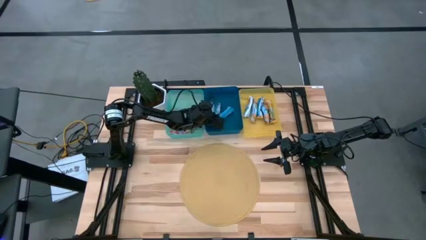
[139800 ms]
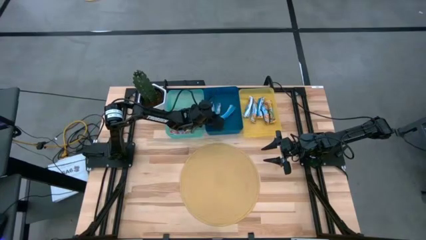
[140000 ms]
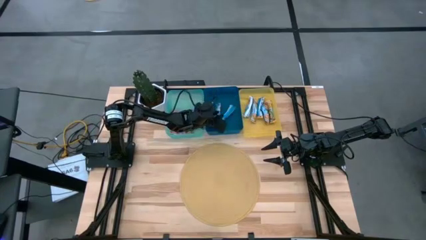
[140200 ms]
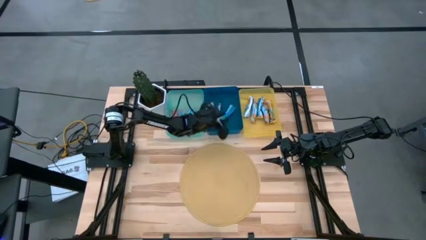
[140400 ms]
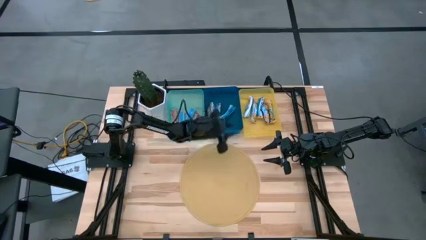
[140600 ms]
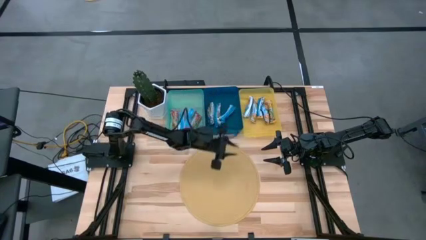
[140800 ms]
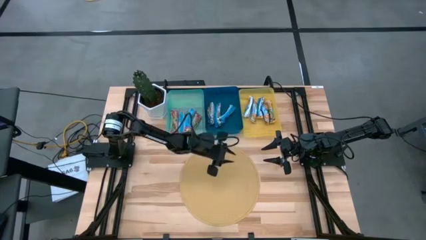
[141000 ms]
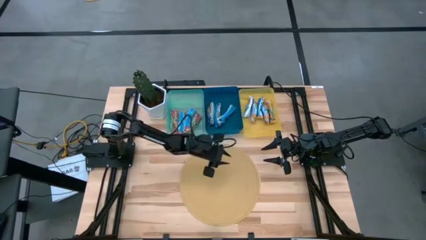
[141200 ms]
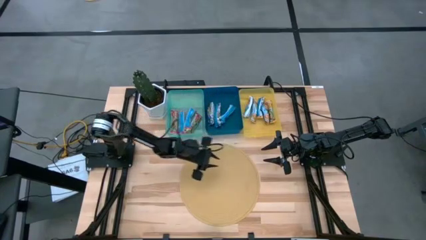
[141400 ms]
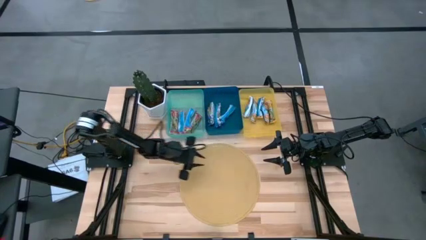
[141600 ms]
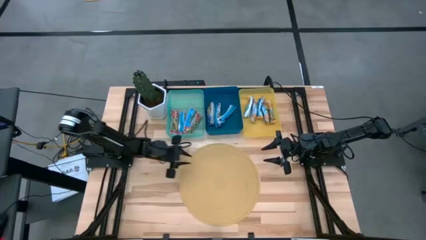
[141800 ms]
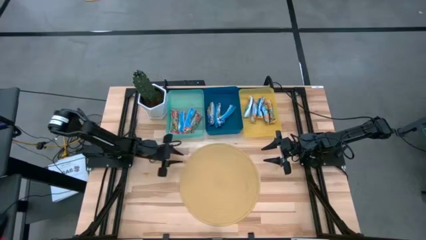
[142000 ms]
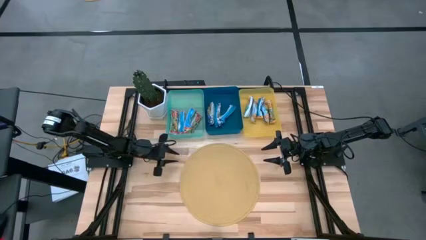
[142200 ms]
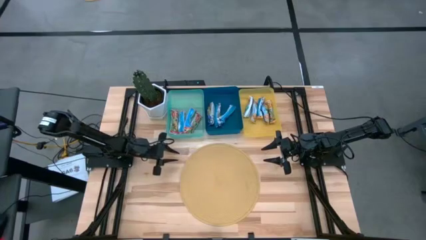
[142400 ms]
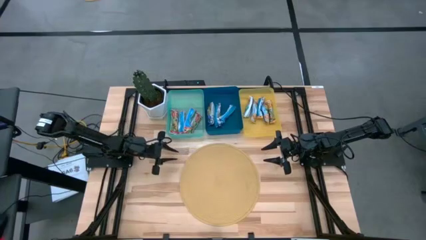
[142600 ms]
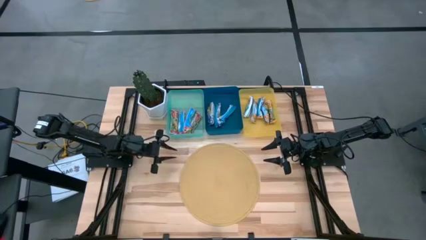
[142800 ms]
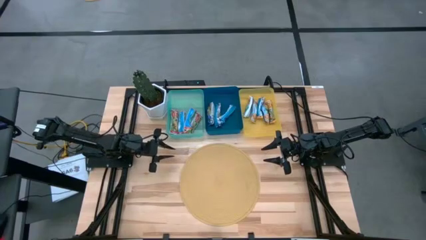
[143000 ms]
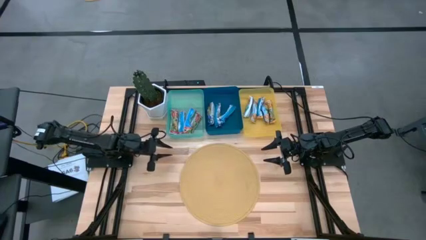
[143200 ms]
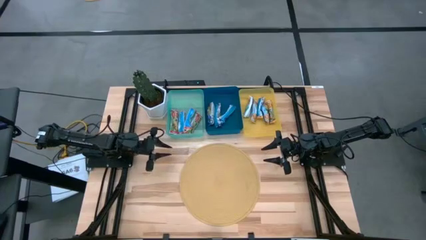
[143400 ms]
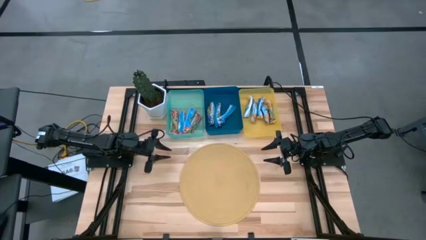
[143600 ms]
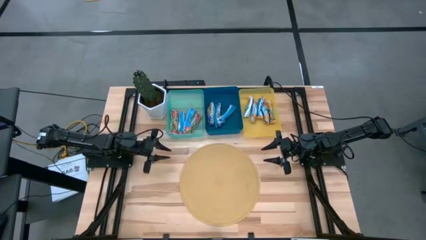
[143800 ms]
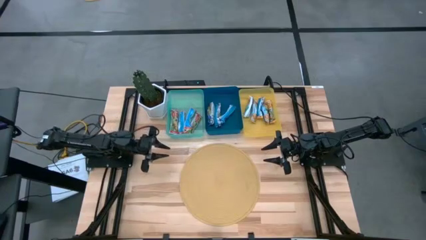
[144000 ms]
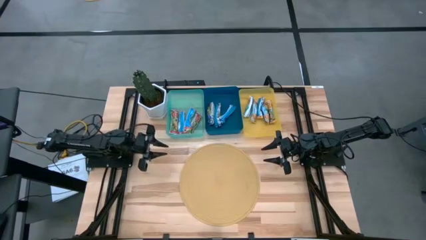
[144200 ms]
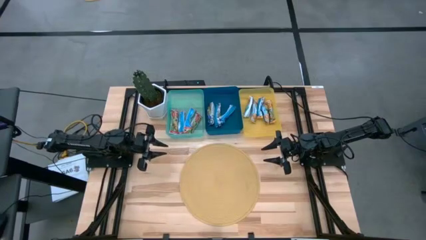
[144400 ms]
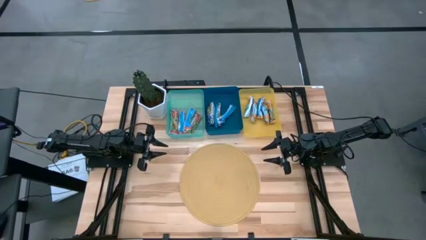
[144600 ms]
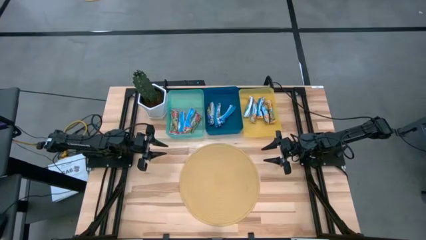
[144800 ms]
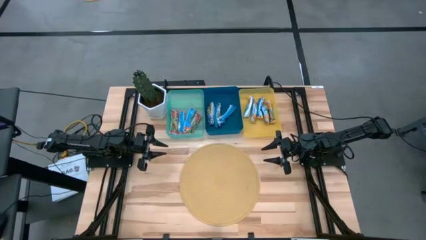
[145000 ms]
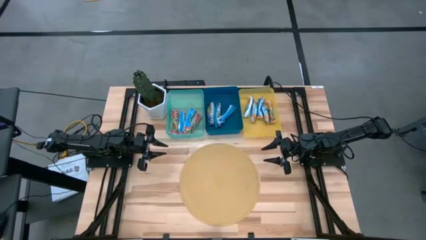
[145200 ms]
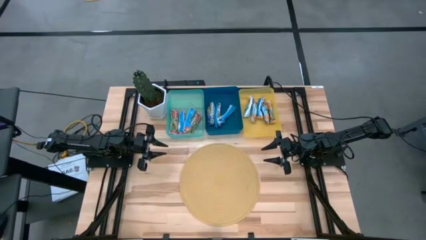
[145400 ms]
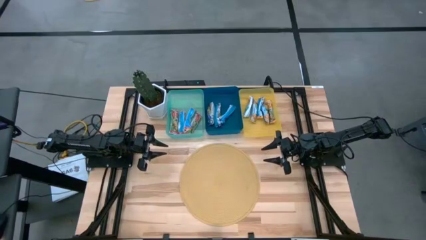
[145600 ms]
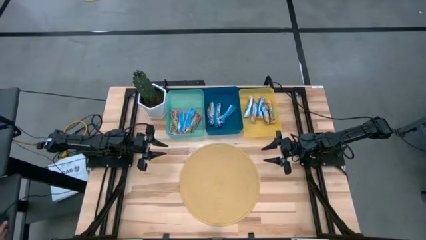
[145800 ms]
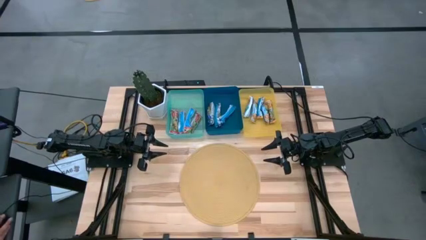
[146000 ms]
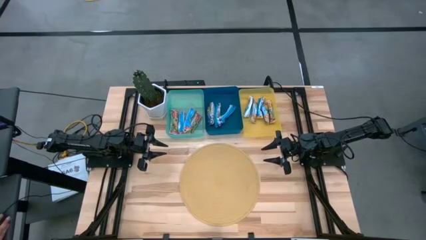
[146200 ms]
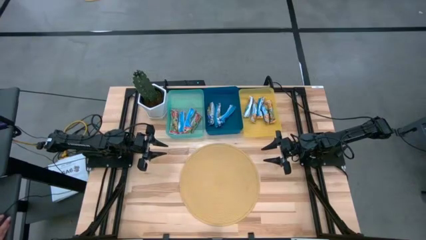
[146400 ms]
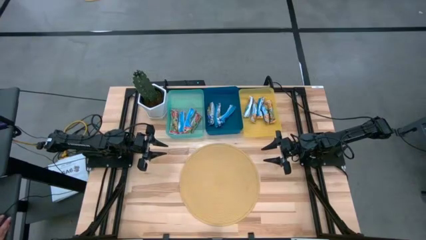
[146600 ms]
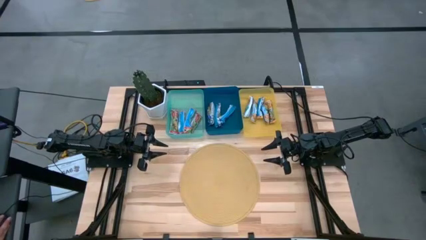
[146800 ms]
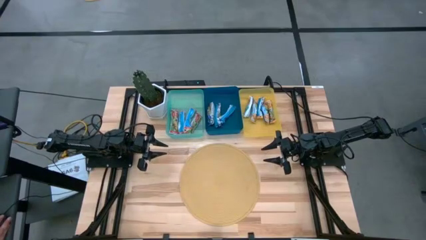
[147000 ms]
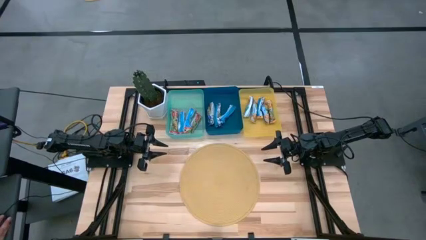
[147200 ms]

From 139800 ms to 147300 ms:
Task: Pick and place Granola Bars by type
Return to Home Position

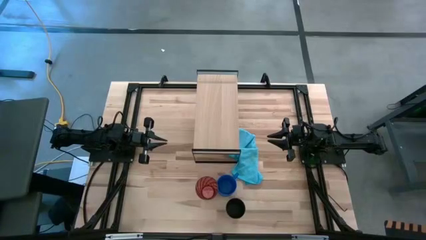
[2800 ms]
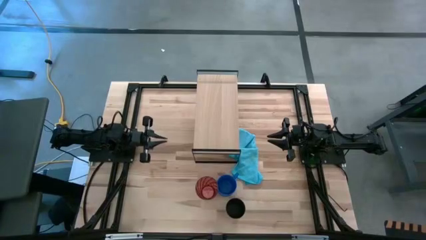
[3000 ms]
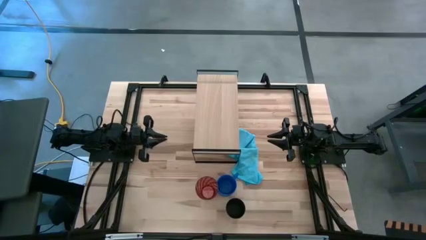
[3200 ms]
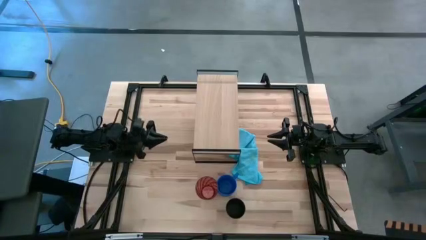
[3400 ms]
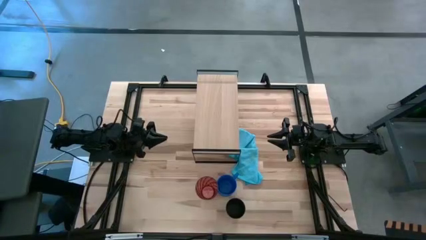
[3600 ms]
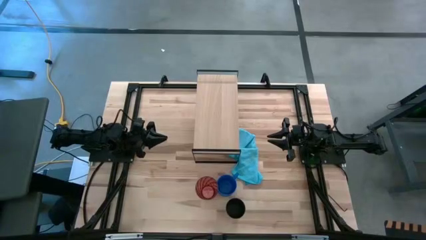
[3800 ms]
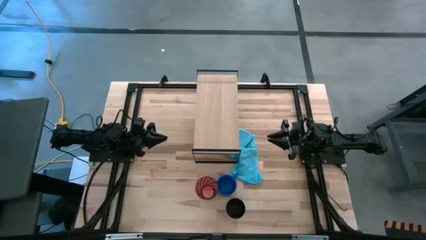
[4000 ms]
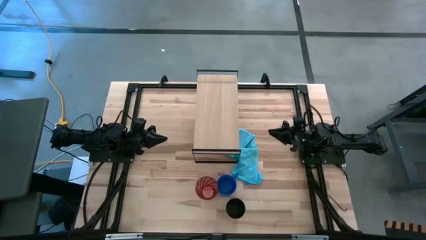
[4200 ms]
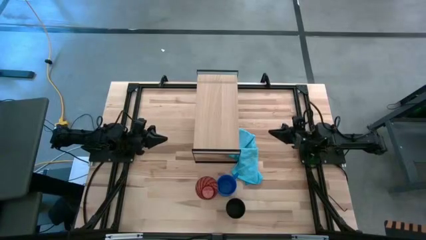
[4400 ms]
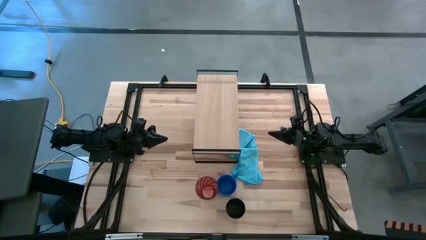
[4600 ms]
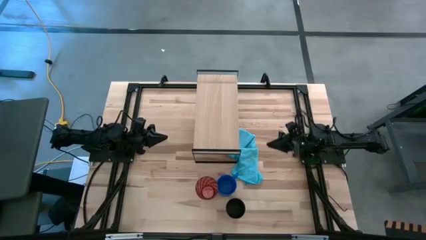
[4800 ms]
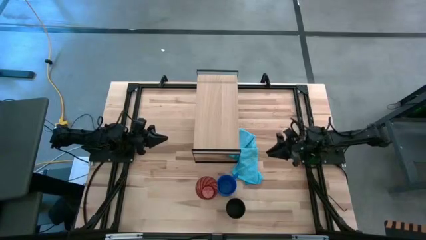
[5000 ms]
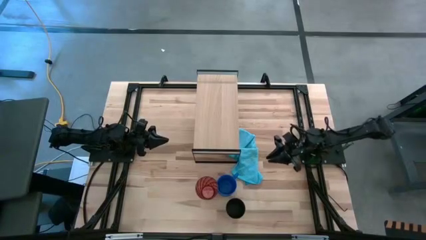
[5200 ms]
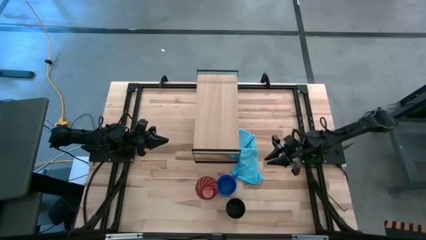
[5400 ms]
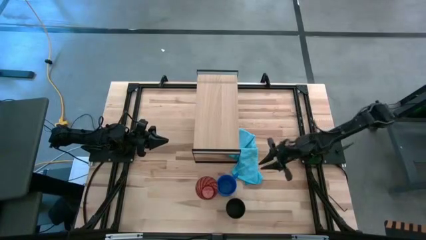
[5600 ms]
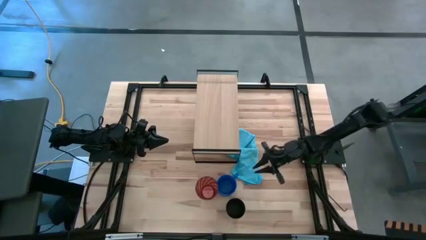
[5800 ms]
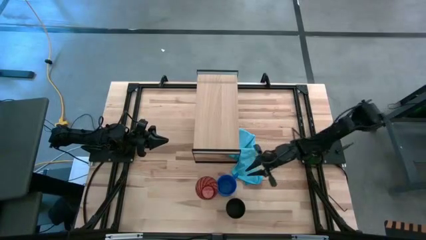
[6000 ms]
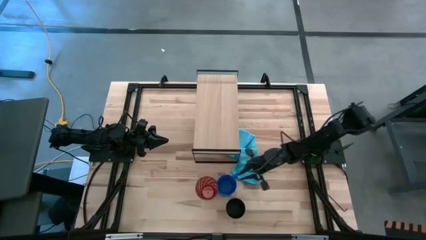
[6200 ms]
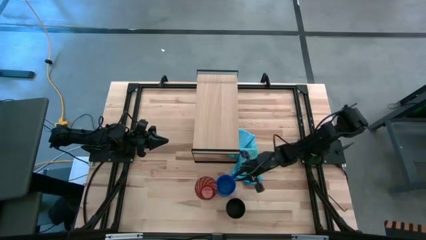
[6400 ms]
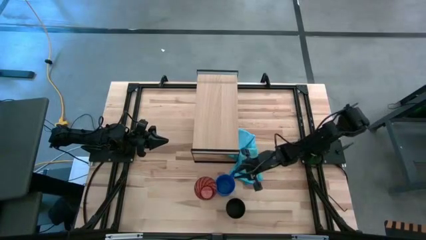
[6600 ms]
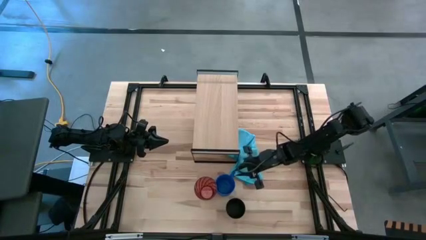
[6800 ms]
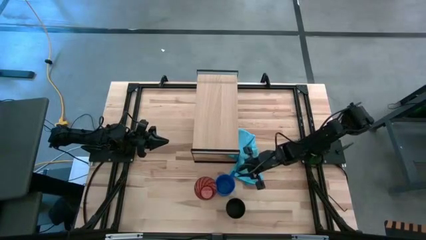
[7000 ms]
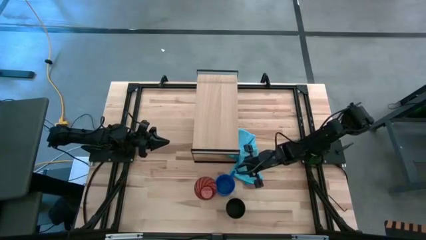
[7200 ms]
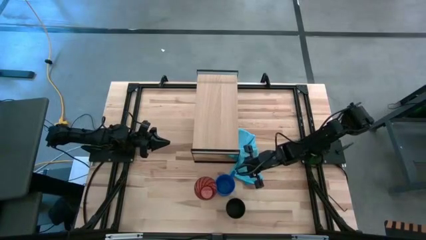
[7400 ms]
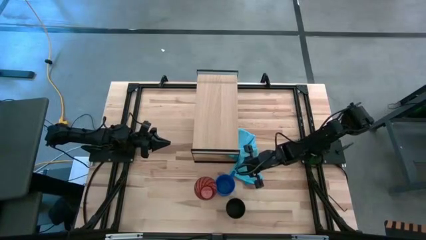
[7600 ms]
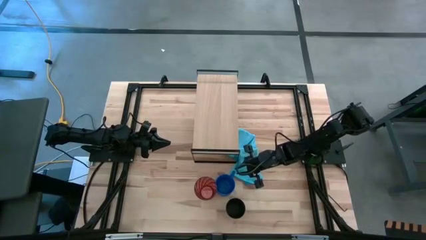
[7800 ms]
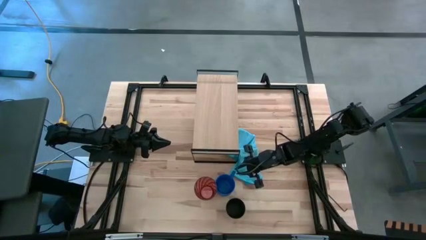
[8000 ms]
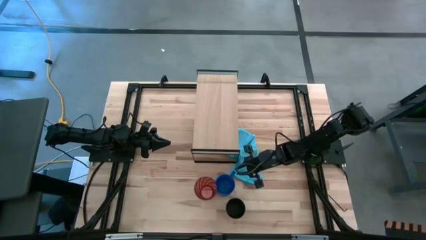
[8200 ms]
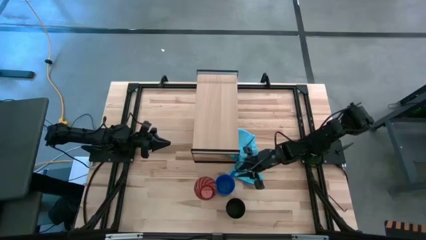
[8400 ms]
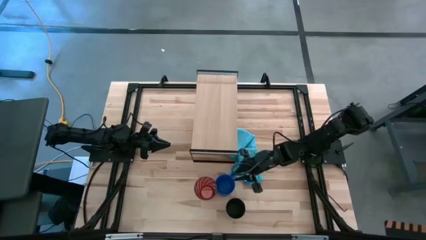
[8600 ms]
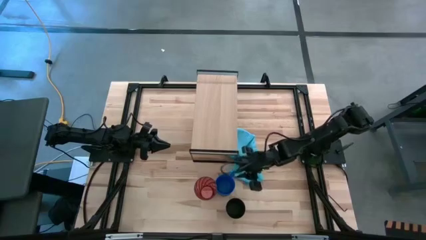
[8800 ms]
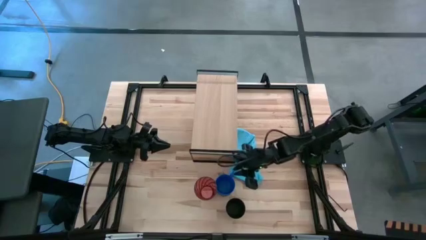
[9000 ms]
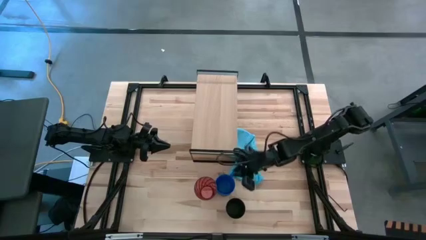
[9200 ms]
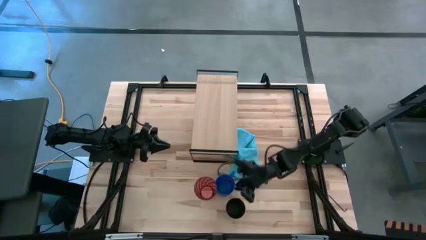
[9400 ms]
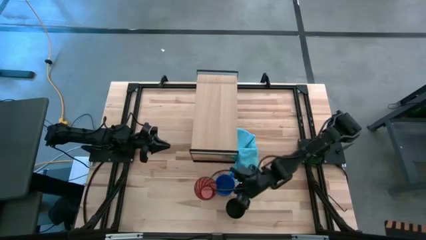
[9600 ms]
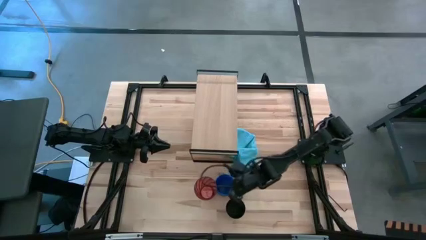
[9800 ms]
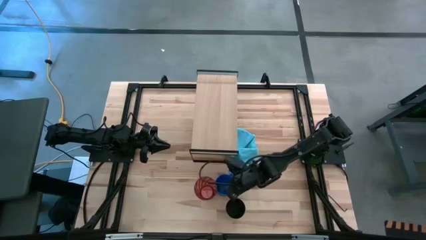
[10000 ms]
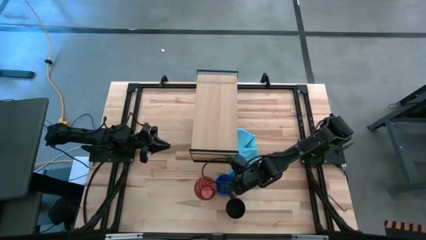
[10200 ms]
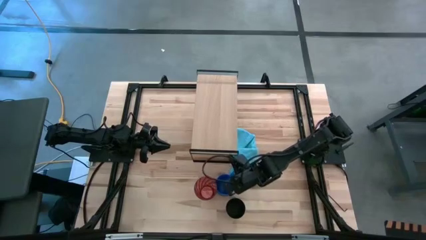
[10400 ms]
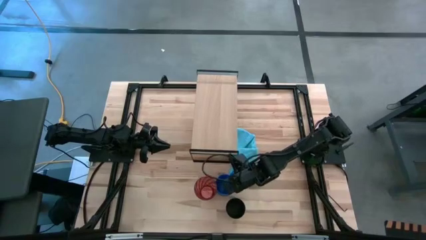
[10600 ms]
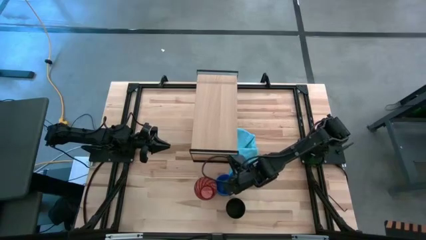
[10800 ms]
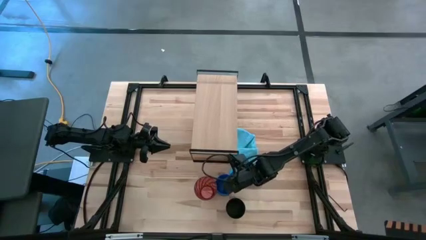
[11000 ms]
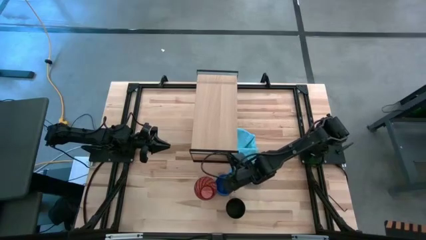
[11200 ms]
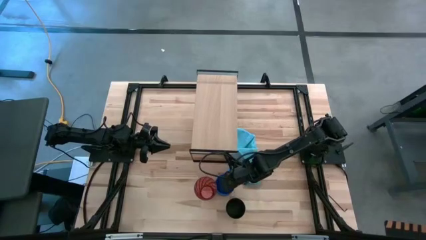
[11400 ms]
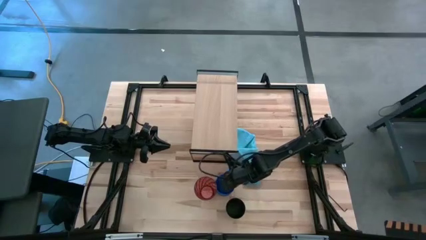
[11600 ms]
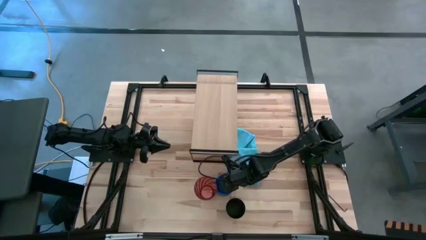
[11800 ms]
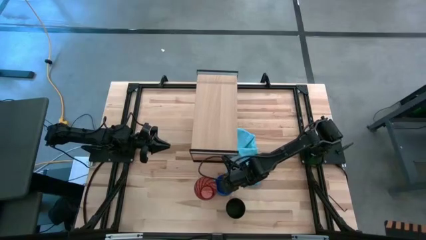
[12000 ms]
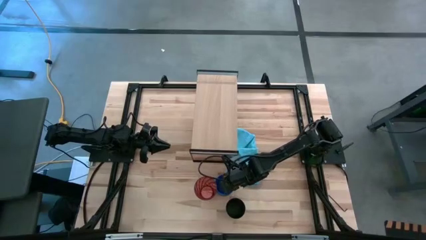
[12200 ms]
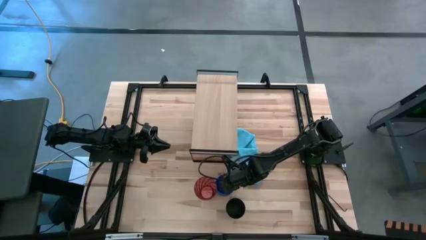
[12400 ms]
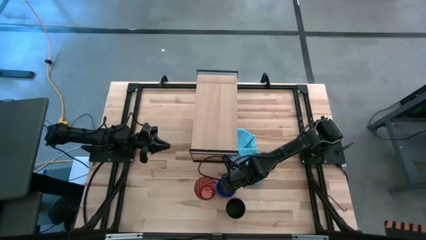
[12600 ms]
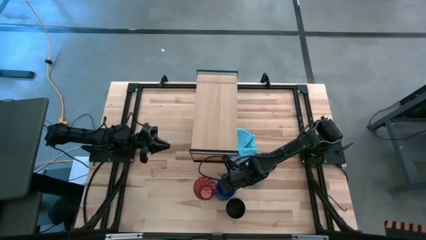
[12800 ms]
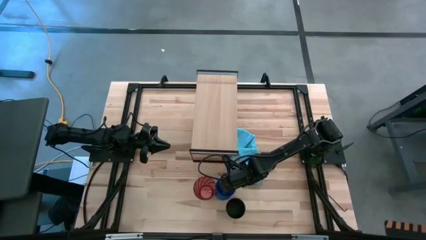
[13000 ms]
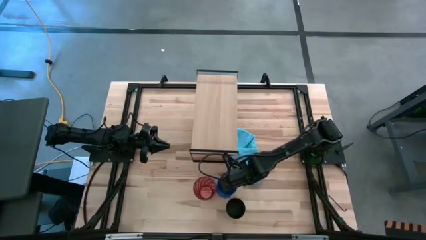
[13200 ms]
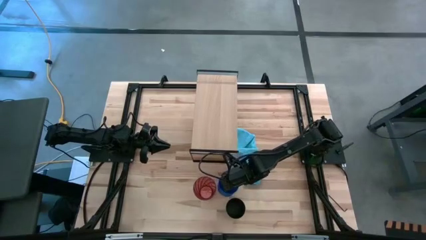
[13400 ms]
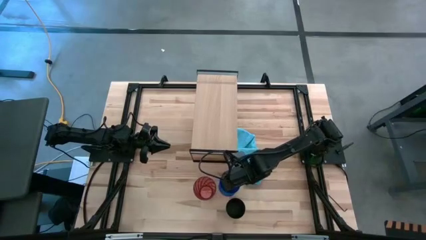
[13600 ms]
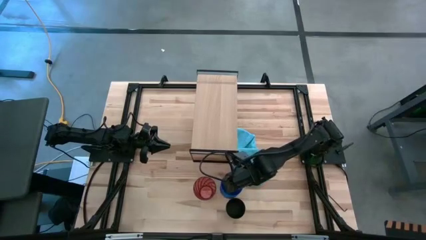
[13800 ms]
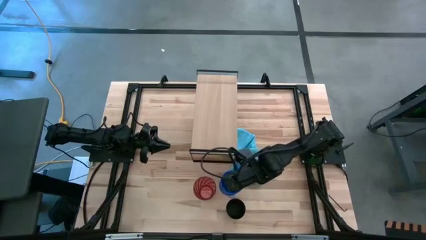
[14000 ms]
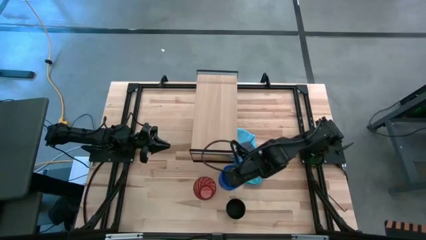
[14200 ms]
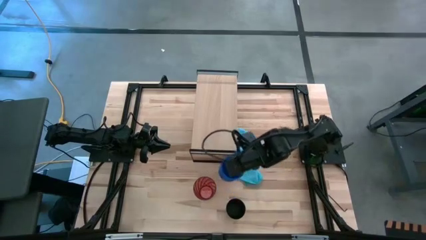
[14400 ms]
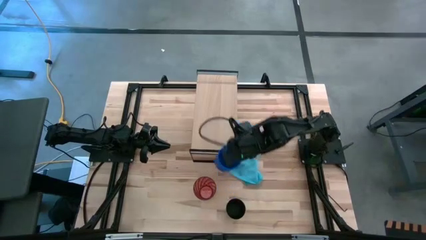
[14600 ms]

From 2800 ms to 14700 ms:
Task: Stack small to large cups/mugs on shelf
Put the blue mug on the shelf
